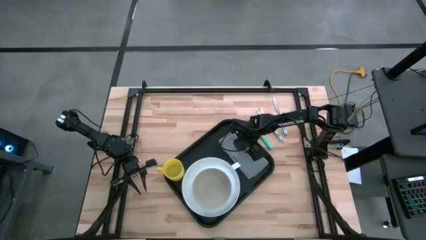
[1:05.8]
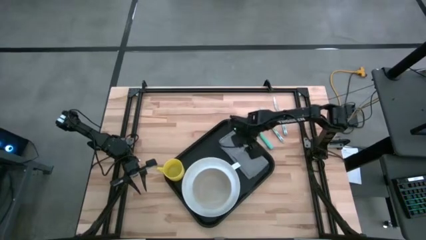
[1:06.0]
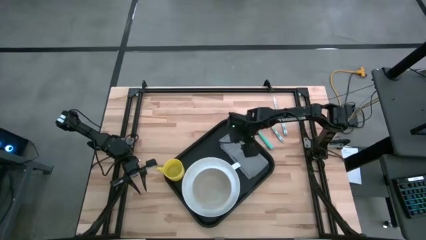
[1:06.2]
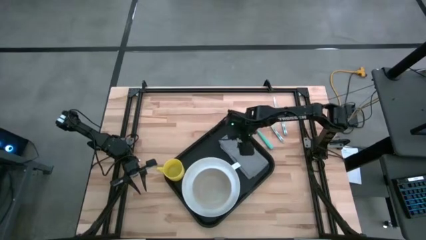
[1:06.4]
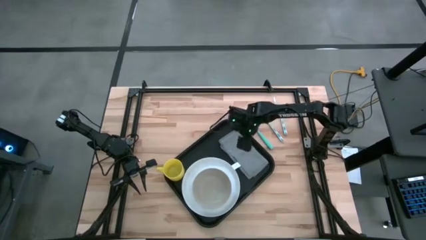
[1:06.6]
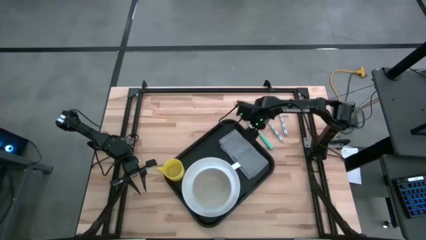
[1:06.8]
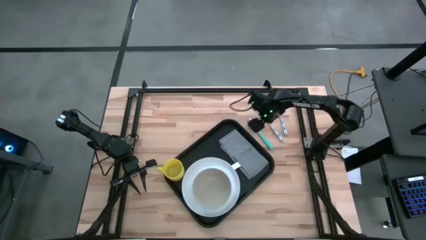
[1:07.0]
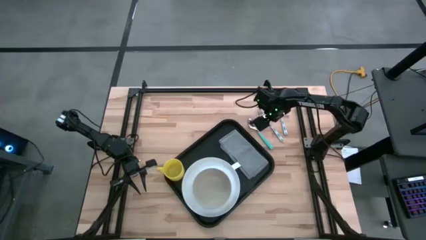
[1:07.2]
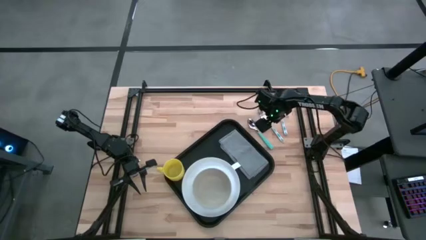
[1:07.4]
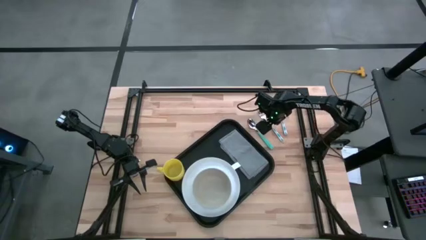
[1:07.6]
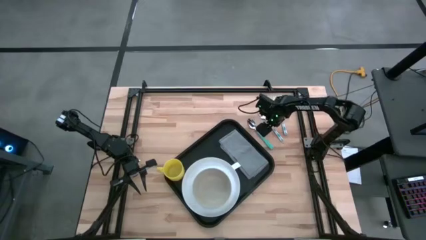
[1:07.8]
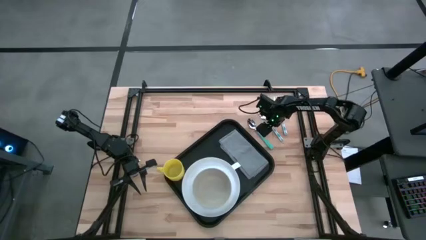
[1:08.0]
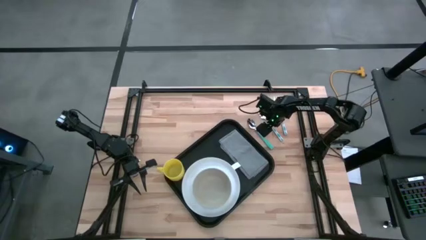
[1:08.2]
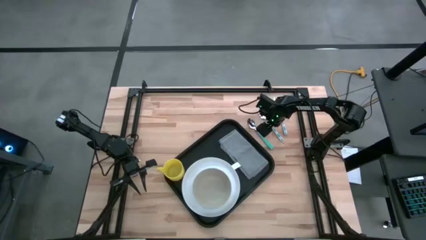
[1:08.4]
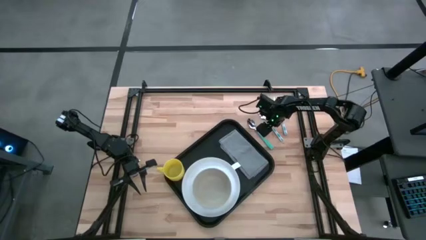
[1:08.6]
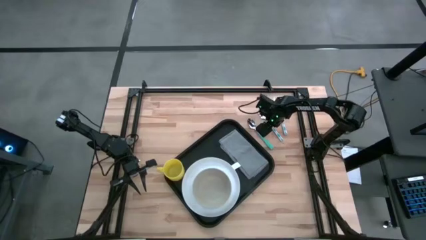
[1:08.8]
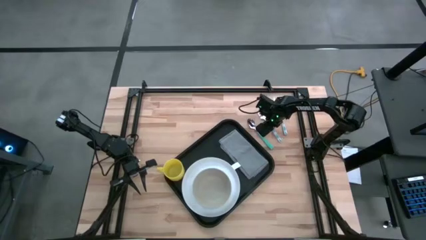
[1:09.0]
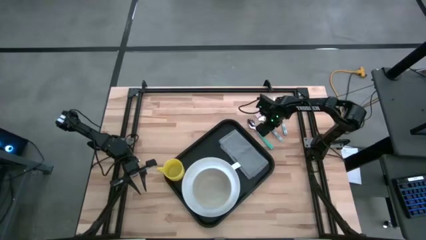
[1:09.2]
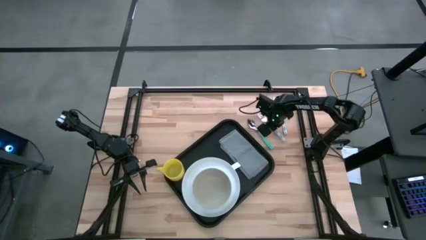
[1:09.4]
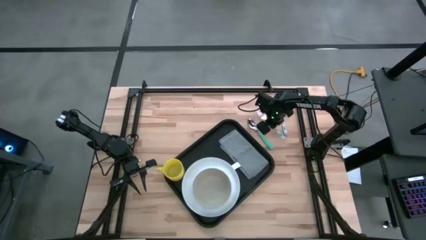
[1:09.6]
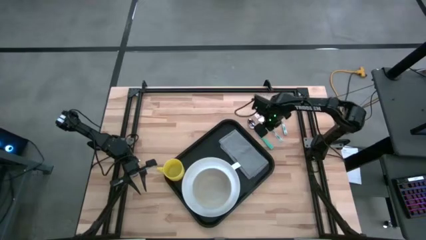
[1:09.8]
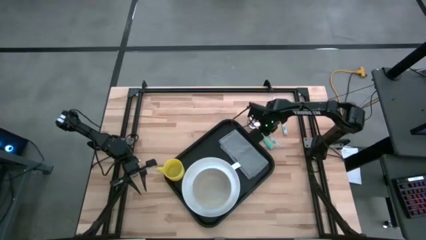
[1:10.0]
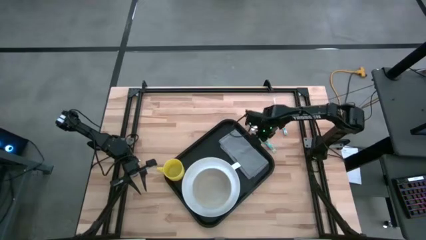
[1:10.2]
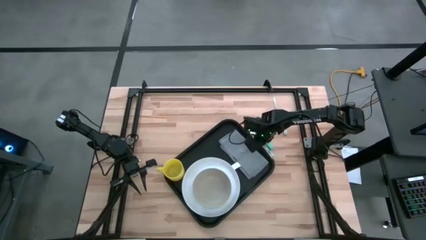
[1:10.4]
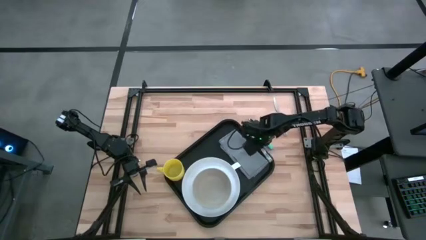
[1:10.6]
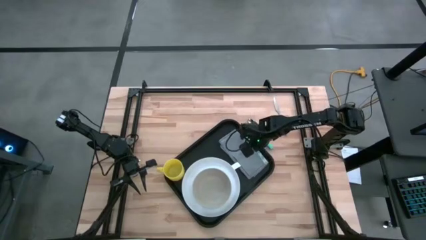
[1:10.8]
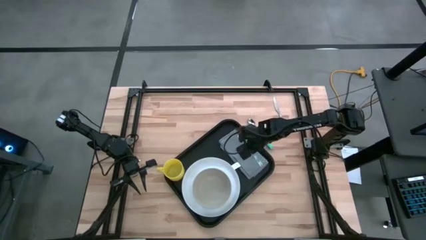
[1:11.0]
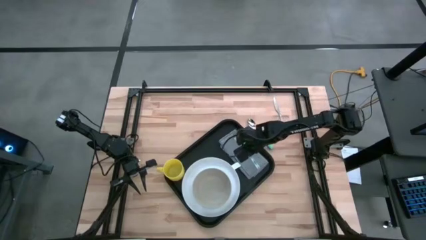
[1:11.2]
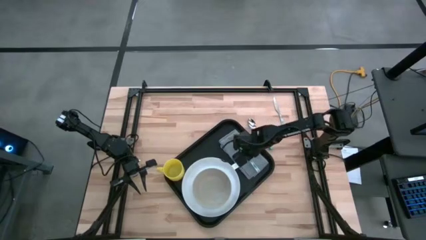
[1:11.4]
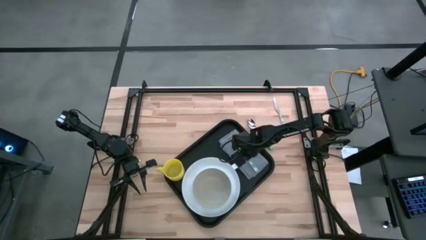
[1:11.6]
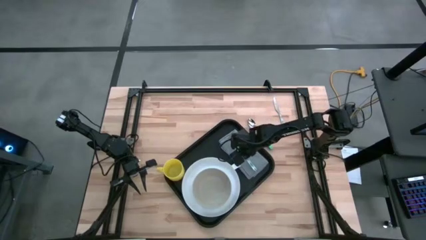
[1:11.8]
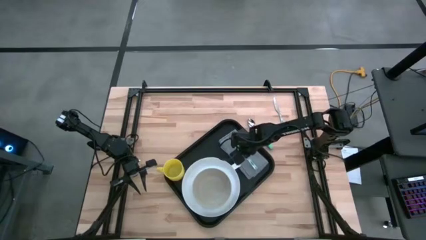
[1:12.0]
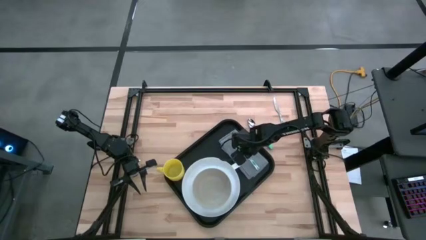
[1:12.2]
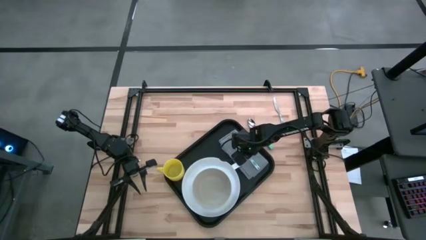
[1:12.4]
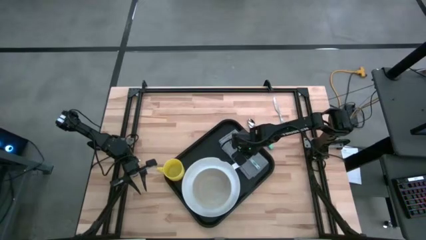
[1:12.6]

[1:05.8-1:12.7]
Task: Set up tray
Put the blue fork on the gray napkin

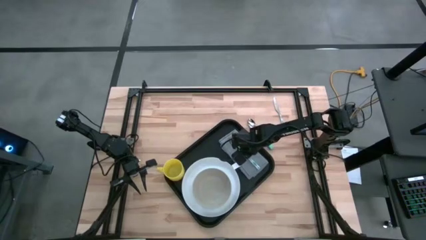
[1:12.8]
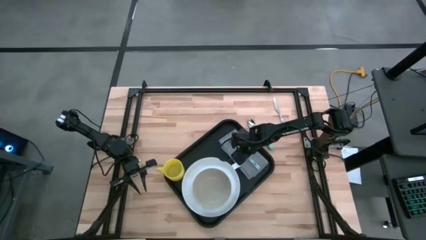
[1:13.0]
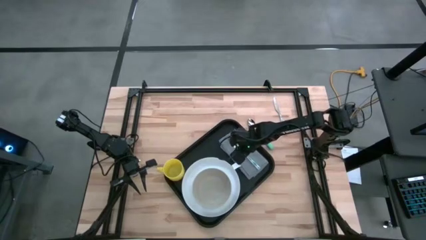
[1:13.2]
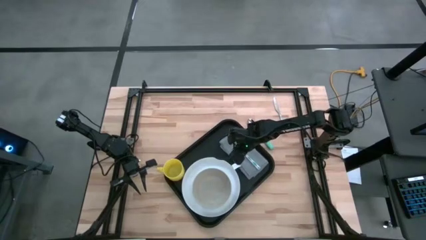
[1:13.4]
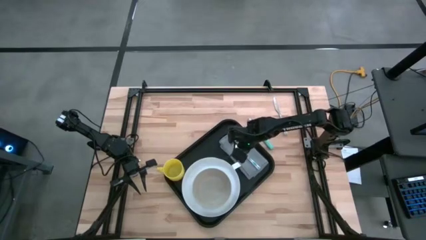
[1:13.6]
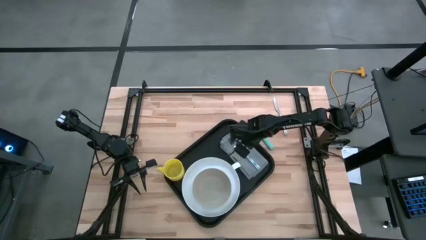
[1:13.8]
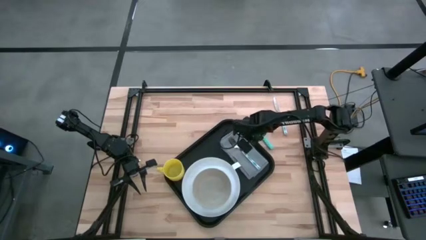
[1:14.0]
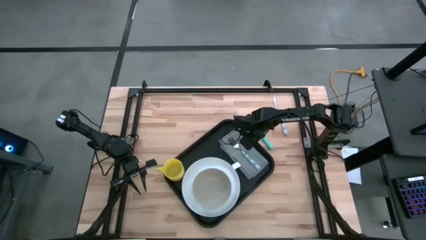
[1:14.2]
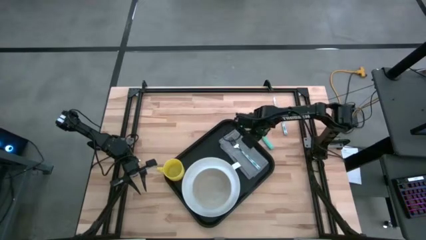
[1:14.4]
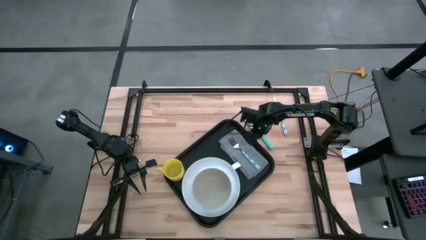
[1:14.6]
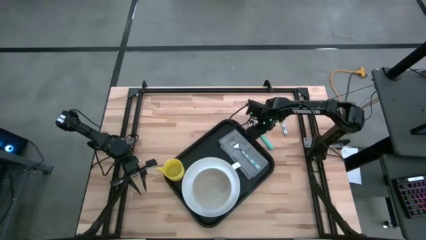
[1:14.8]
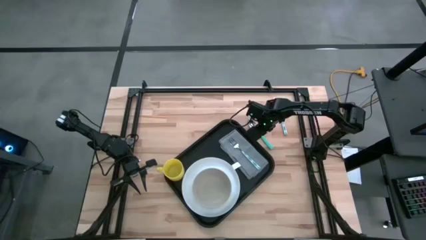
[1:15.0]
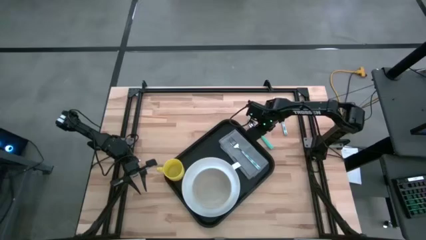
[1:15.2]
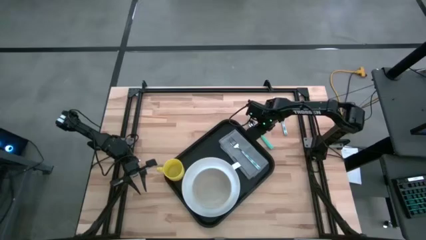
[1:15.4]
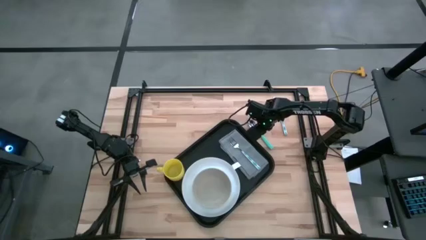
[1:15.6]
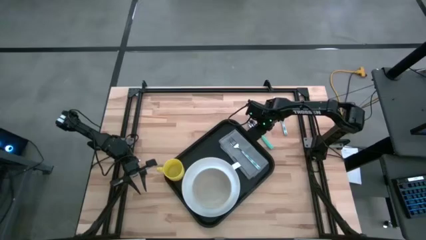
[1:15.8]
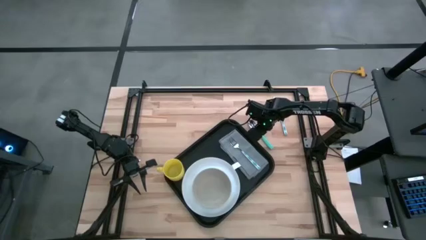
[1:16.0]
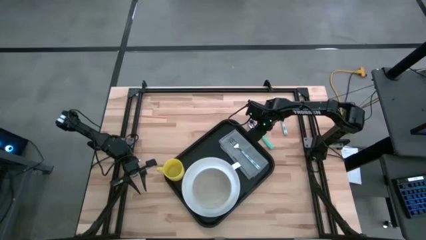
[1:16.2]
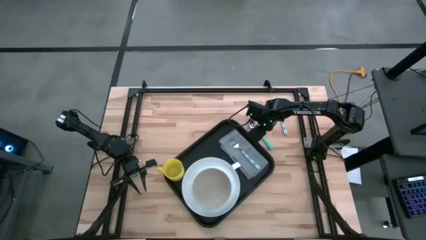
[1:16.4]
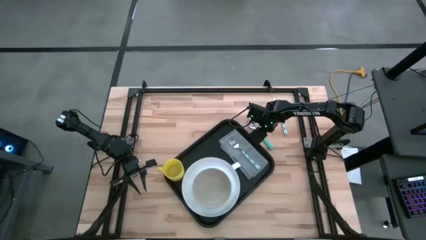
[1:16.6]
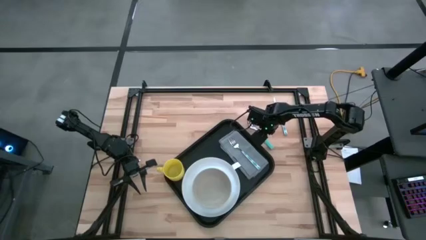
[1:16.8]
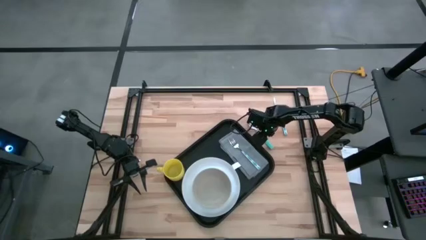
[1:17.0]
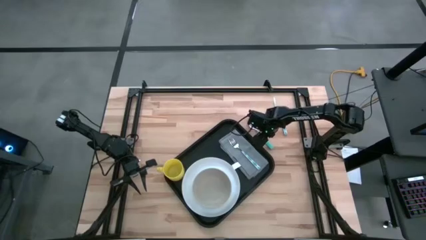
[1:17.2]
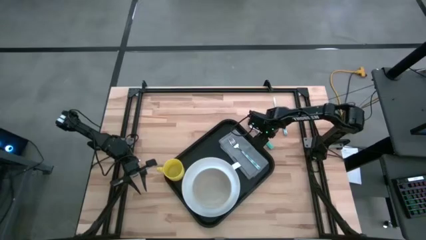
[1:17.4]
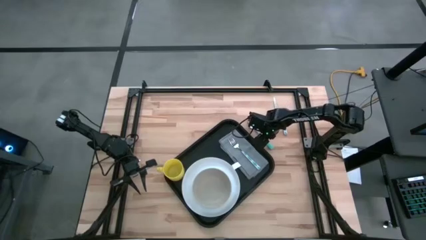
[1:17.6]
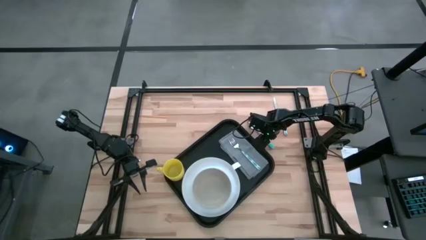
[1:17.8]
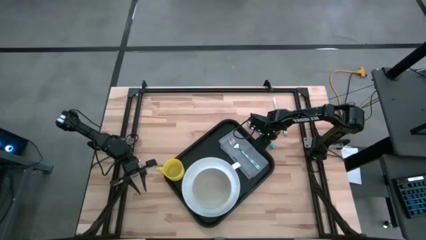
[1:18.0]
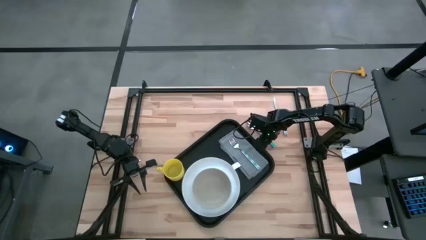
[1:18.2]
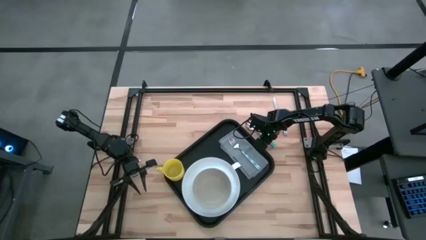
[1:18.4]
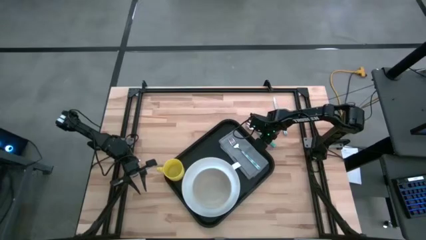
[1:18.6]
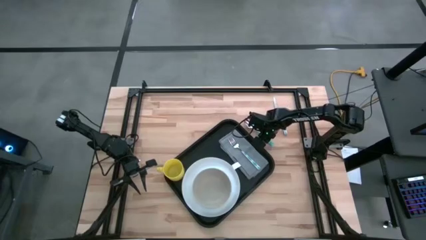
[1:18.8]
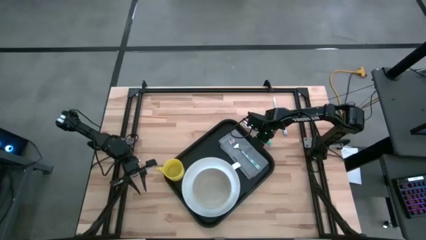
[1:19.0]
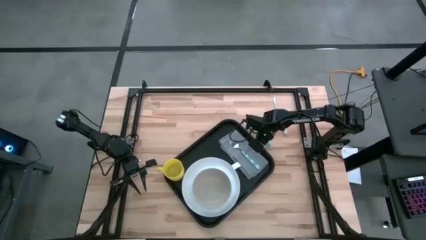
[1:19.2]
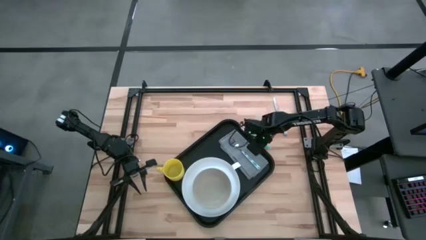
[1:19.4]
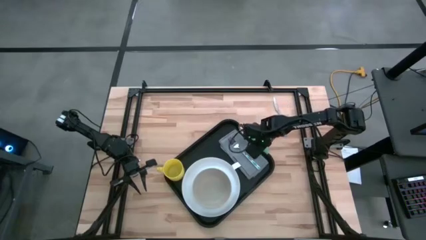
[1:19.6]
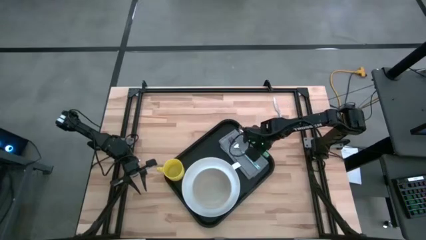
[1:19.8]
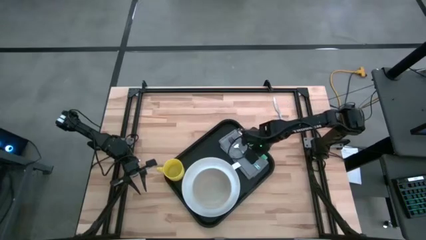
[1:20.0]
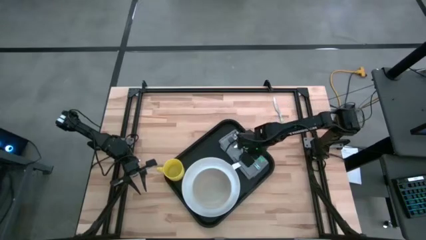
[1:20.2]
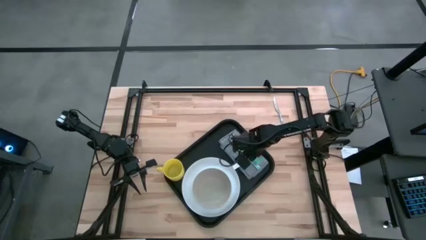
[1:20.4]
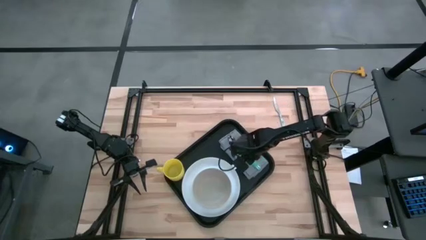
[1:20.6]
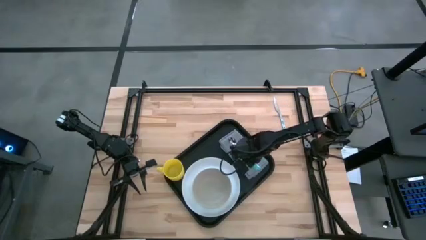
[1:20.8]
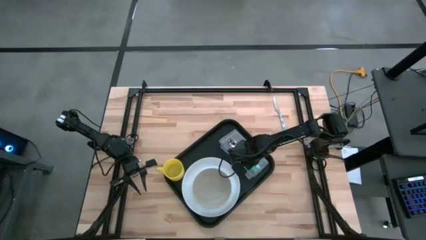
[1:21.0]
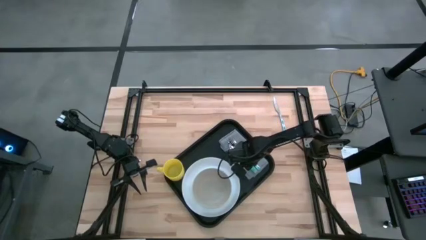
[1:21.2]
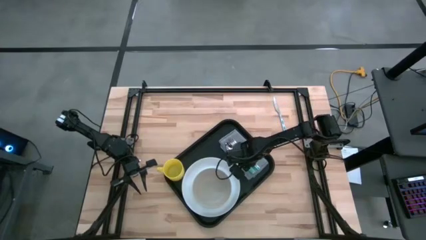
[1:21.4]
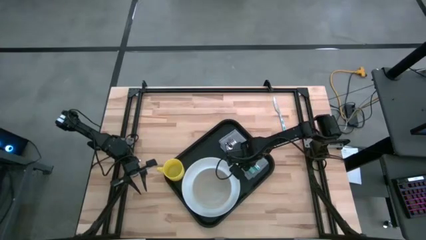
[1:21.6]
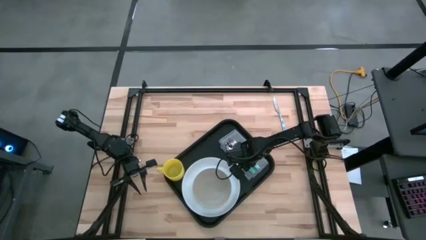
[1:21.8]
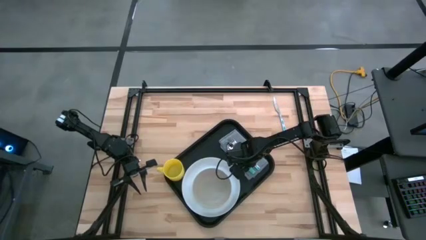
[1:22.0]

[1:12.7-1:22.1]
Put the blue spoon on the gray napkin to the left of the blue fork

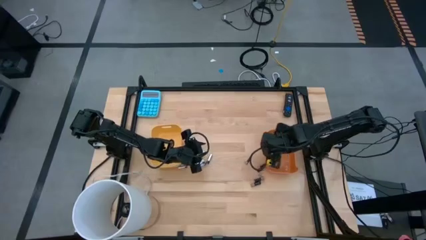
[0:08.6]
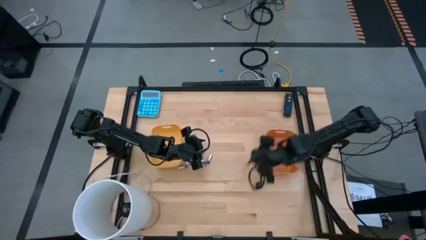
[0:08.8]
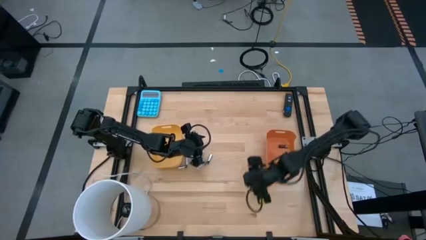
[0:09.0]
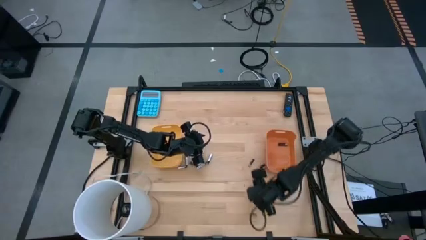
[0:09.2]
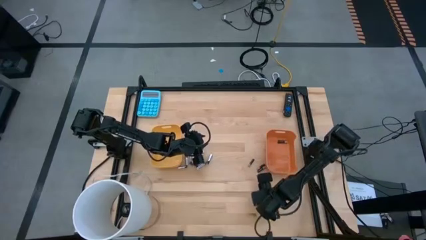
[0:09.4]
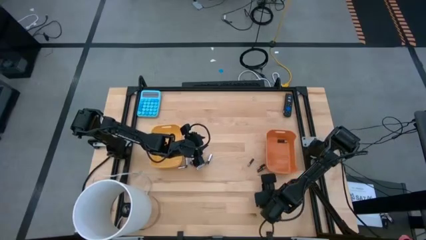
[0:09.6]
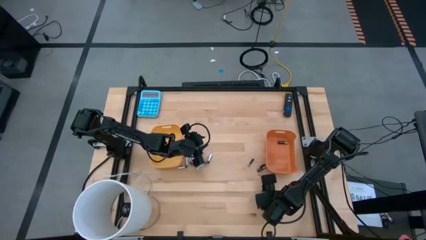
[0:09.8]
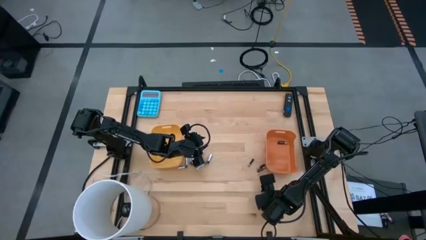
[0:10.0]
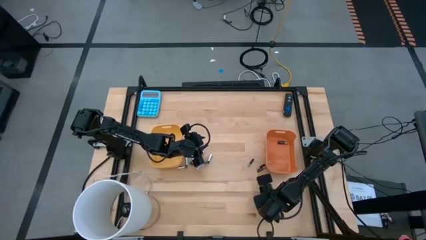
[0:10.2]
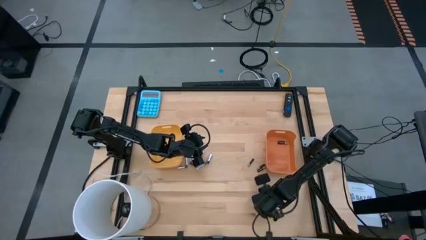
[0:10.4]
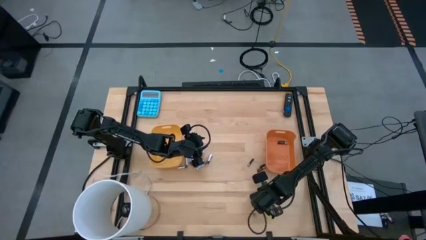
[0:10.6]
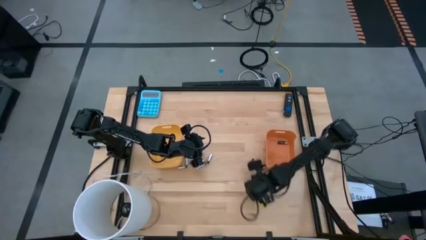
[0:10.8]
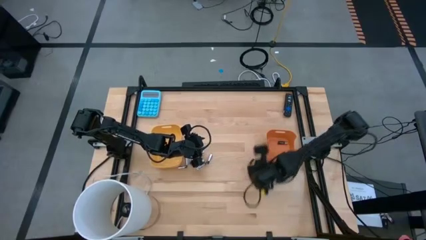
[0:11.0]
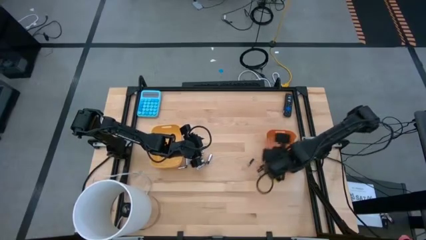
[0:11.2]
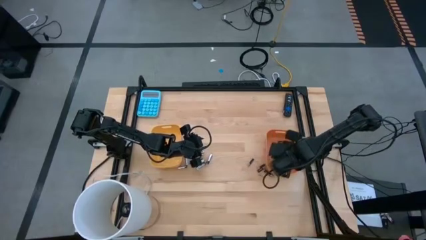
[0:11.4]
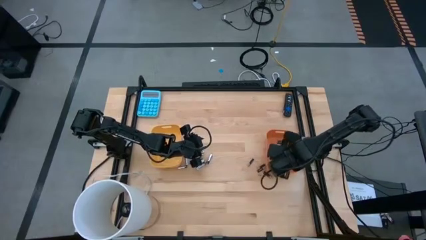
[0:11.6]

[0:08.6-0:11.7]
Task: Sort batteries
Put the black battery into the orange bin
